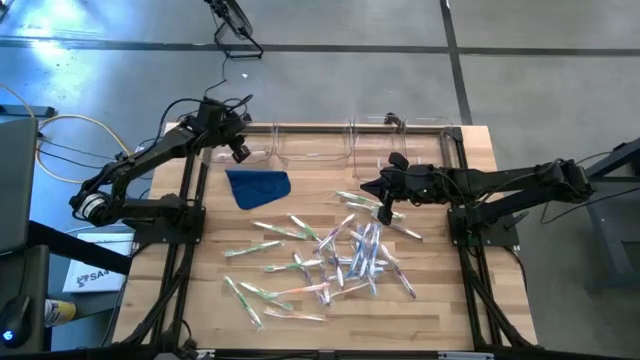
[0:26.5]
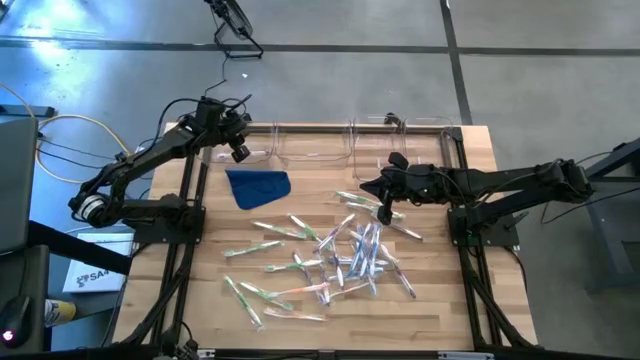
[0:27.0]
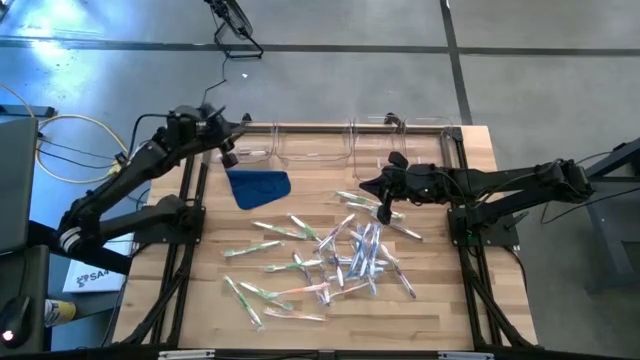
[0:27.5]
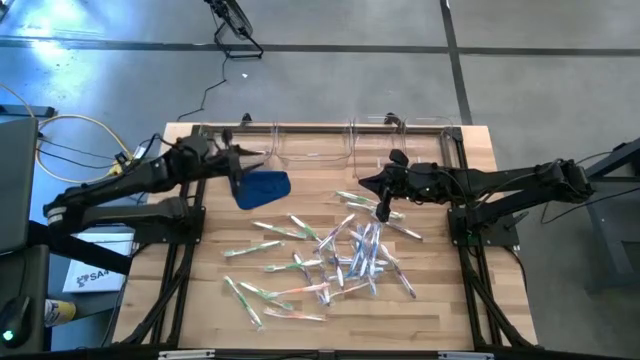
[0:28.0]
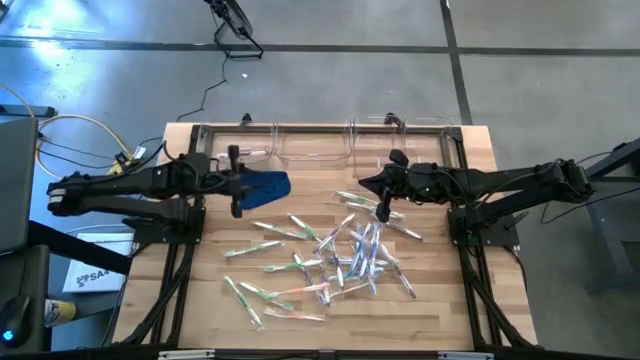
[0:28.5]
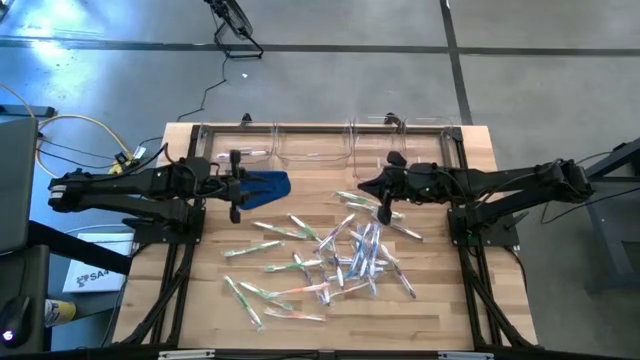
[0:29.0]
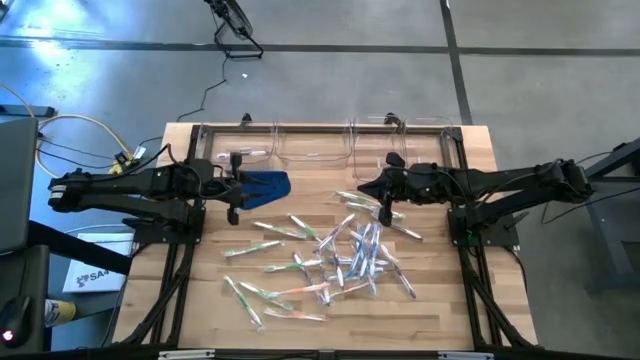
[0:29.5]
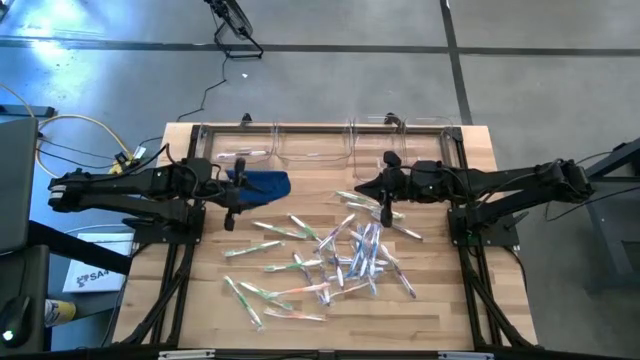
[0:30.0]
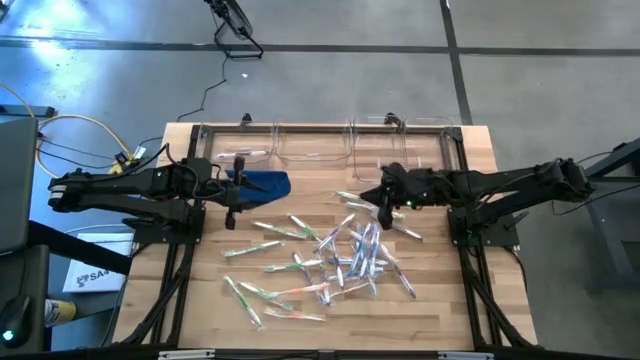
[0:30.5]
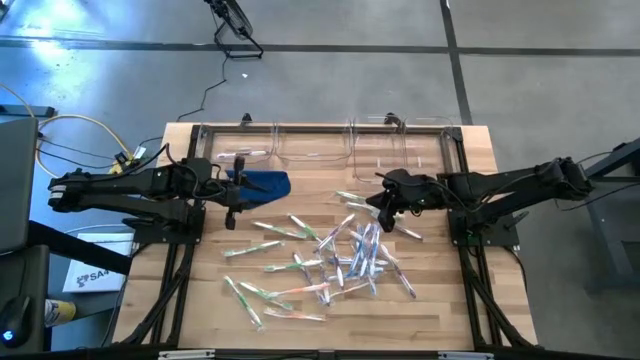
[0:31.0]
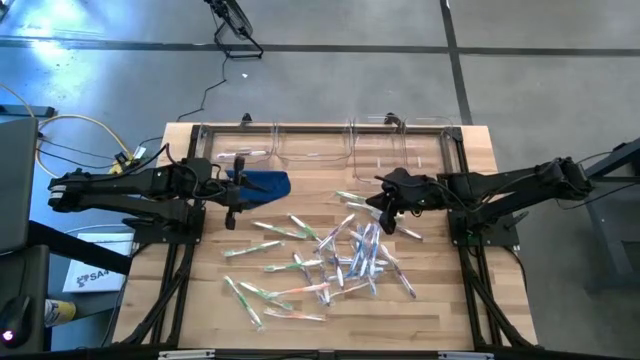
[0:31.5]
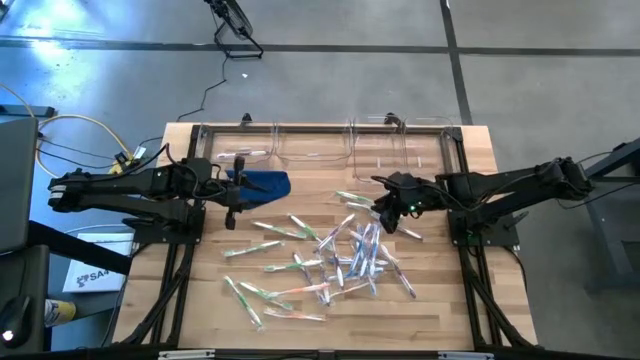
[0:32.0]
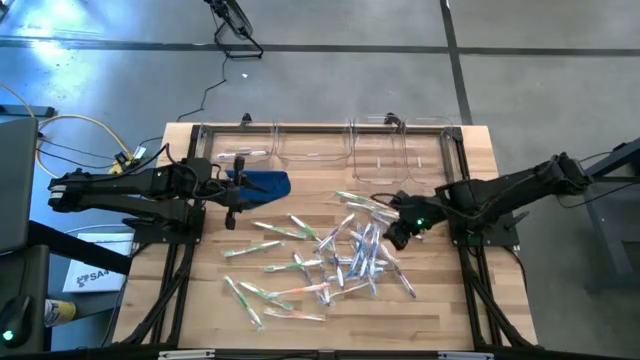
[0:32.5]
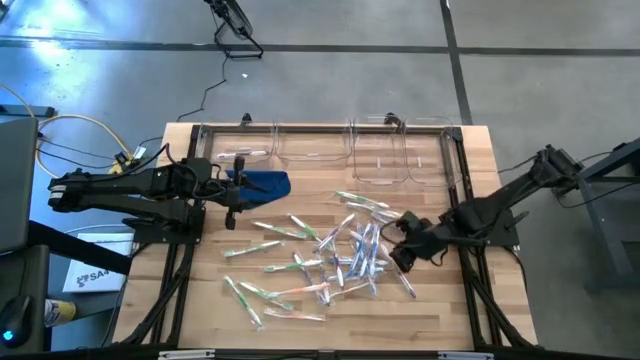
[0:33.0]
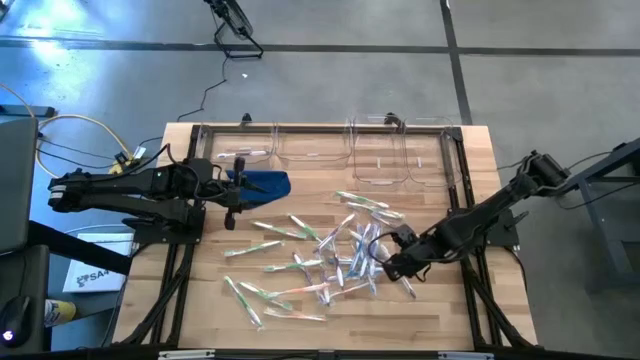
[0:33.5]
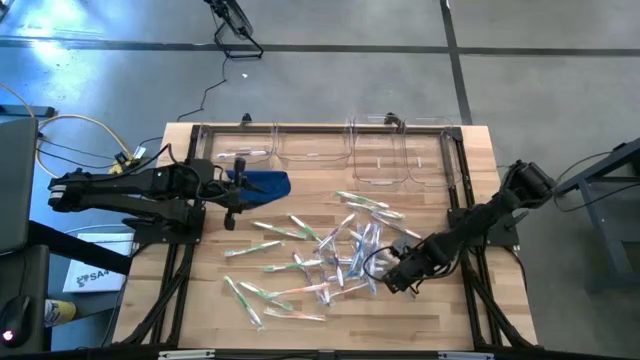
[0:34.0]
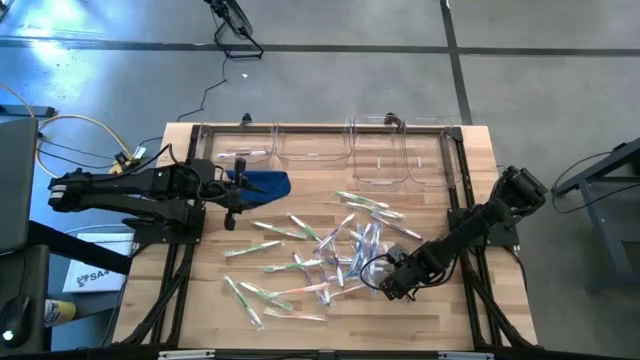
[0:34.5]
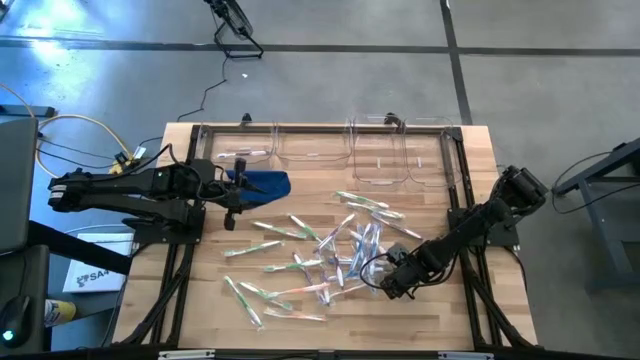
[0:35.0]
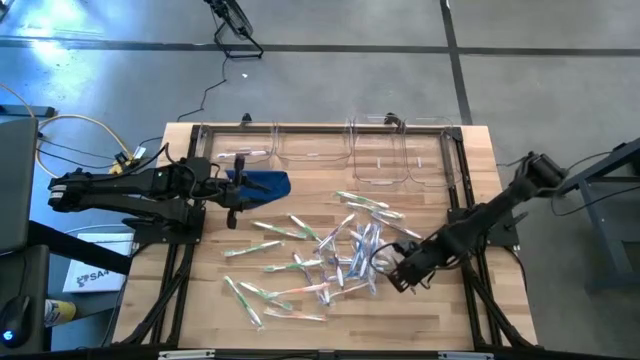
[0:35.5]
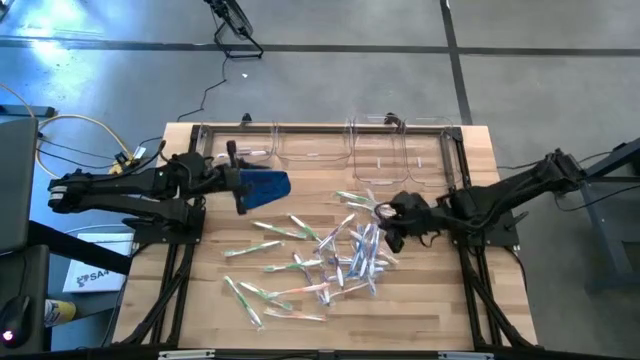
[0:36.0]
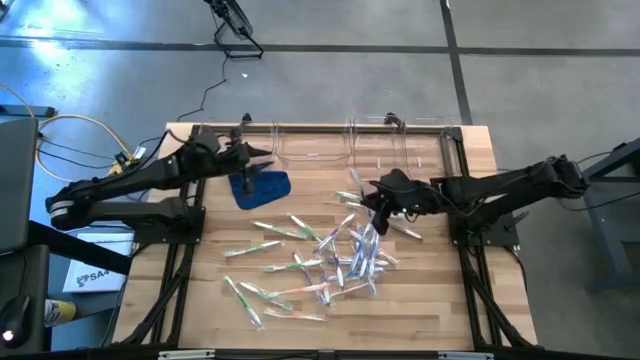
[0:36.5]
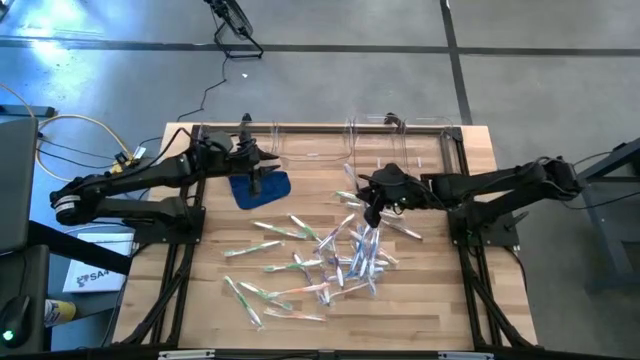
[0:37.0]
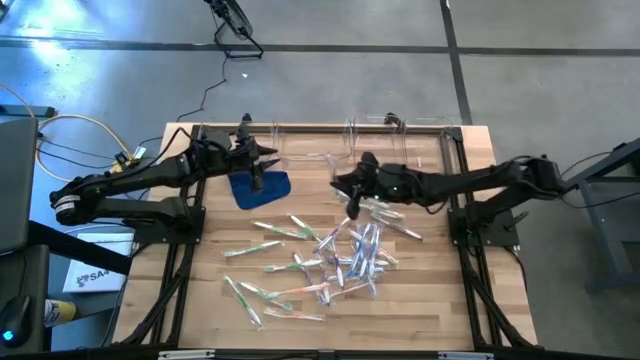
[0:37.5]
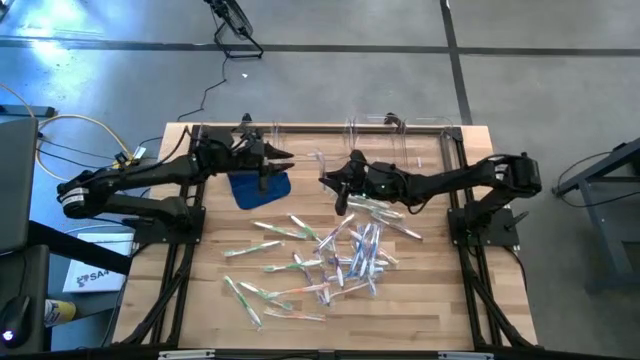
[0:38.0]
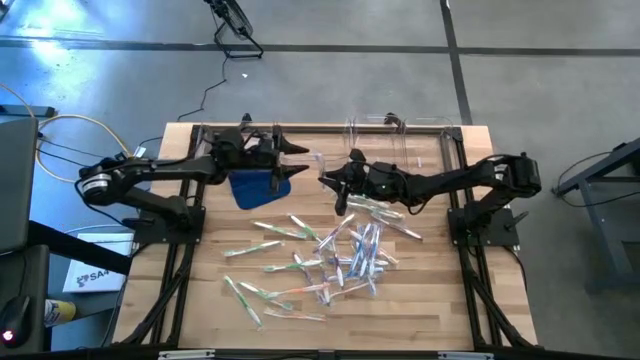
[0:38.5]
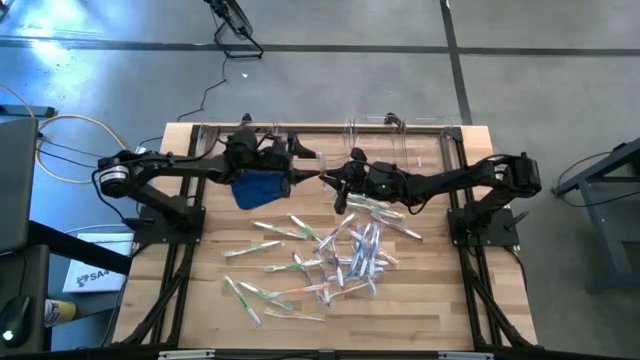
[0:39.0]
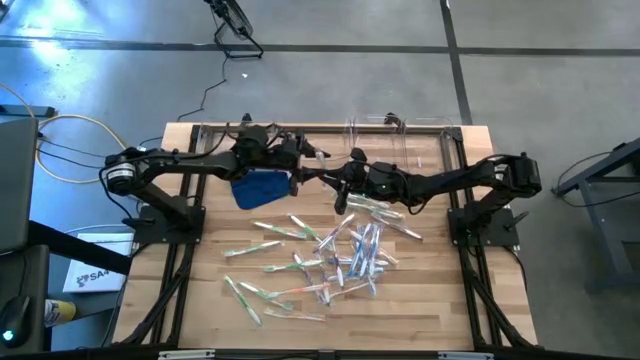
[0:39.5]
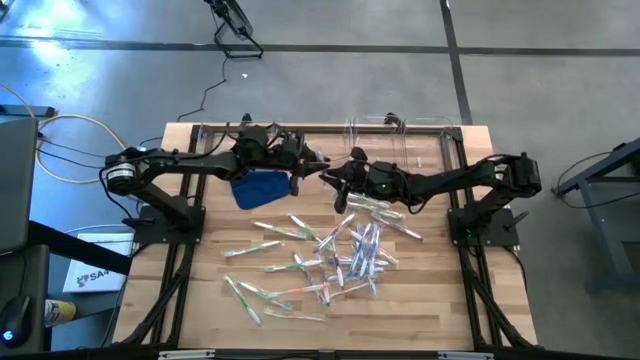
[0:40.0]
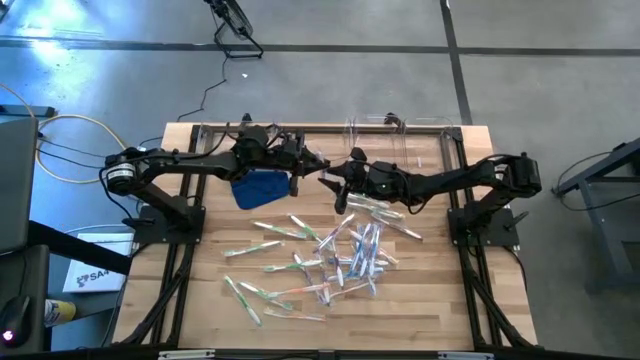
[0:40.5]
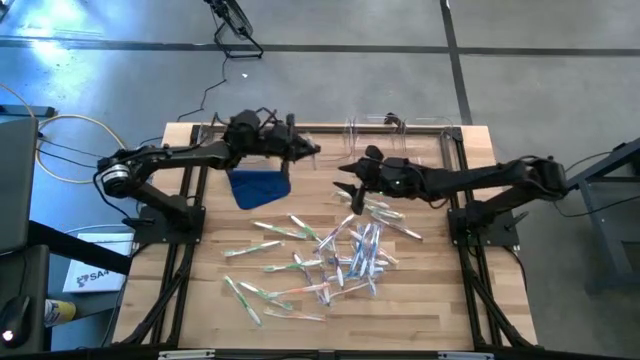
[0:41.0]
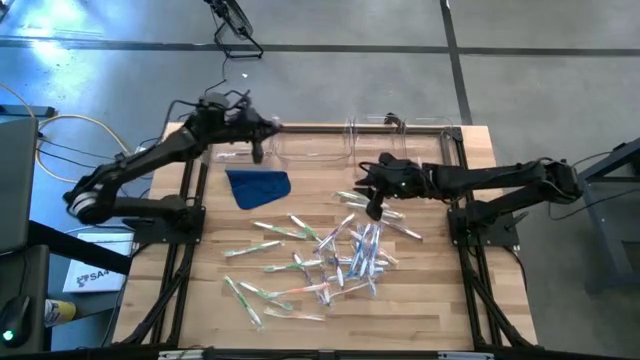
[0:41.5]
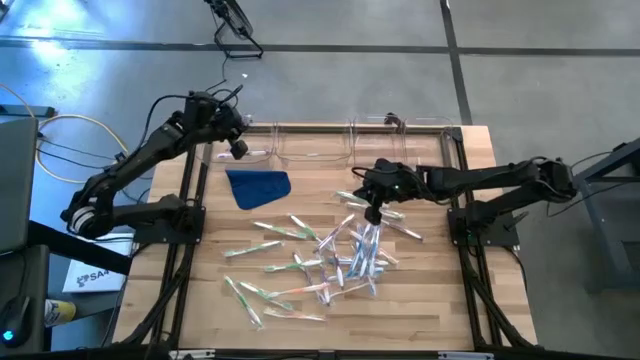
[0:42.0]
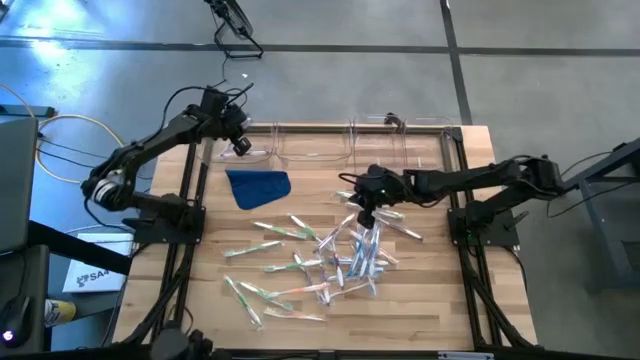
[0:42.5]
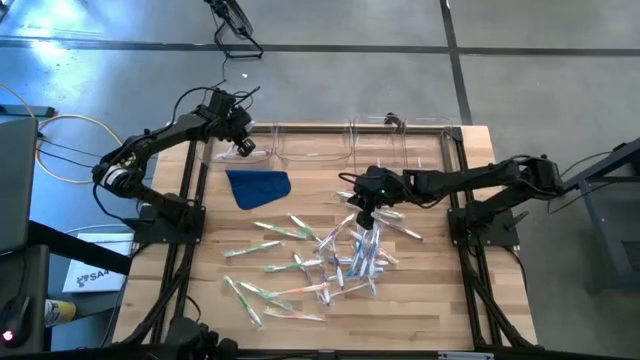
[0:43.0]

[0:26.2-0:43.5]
Task: Pick & Place Toothbrushes
Put the violet toothbrush into the left transparent bin

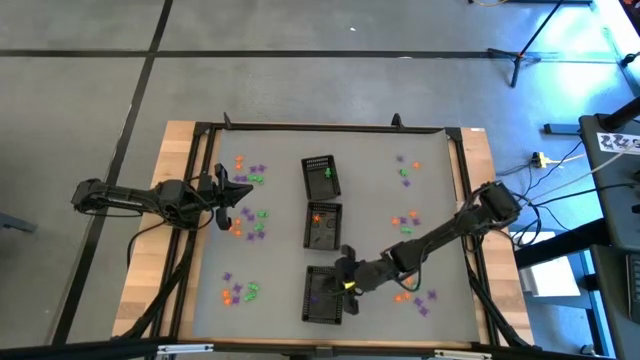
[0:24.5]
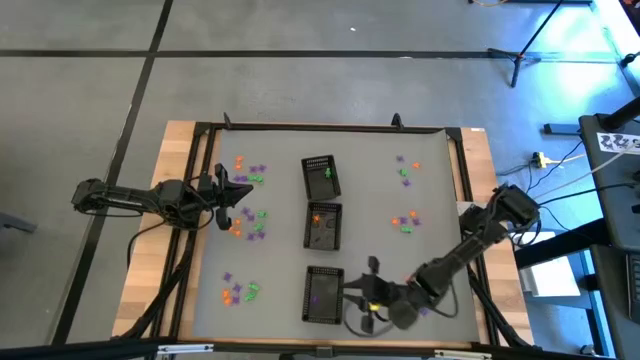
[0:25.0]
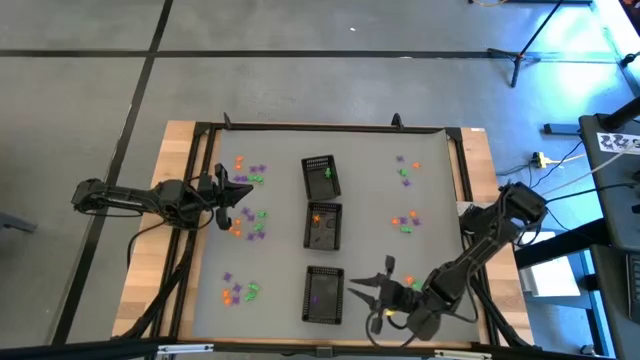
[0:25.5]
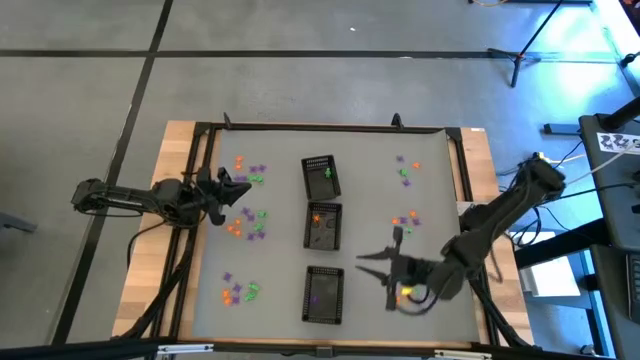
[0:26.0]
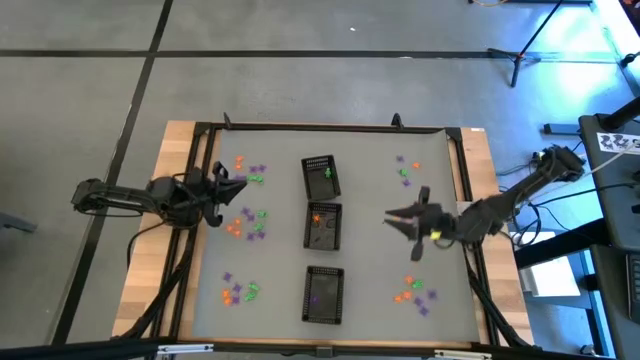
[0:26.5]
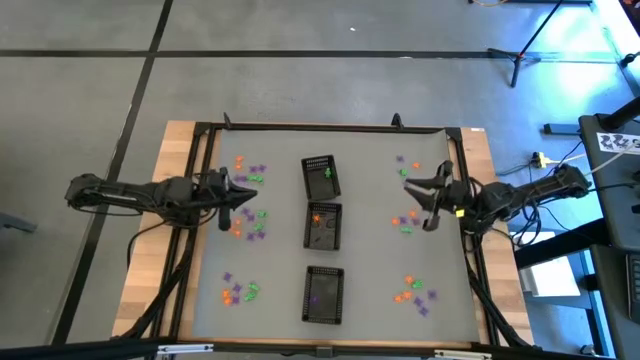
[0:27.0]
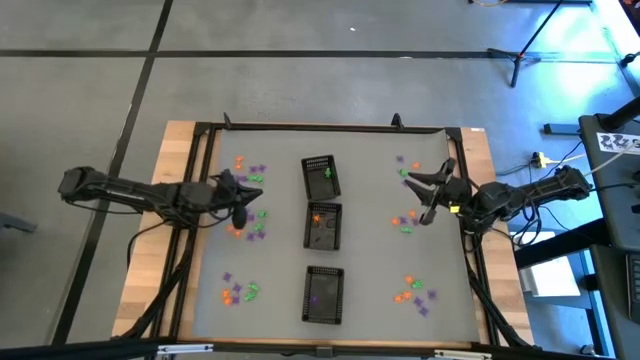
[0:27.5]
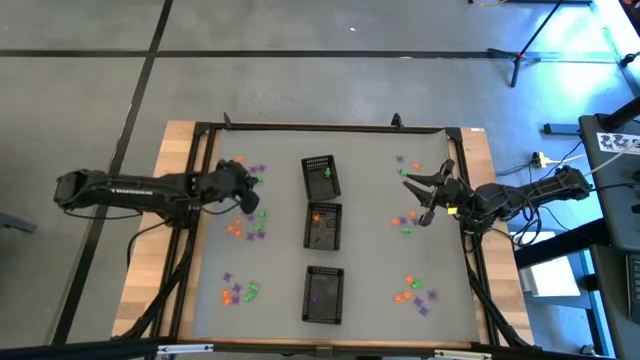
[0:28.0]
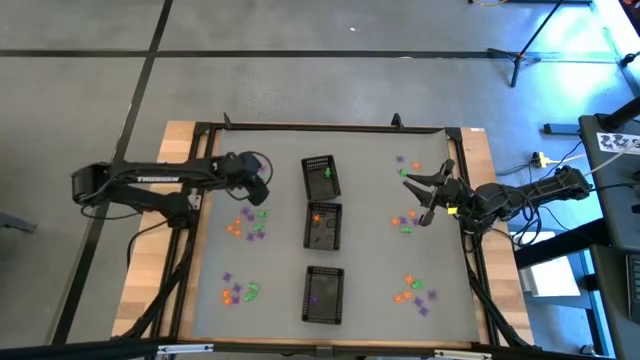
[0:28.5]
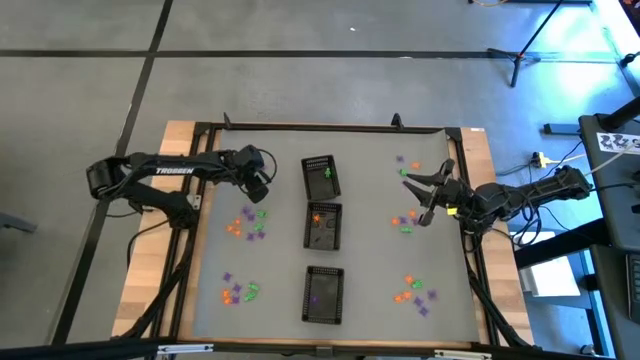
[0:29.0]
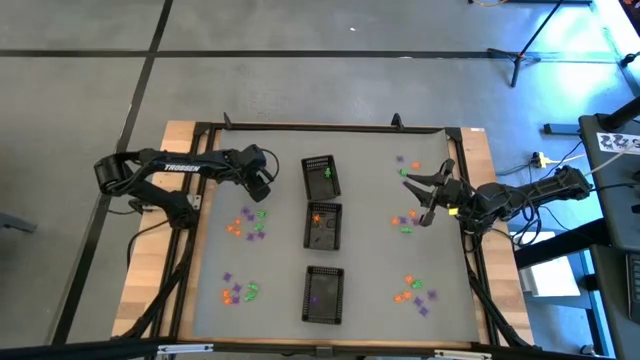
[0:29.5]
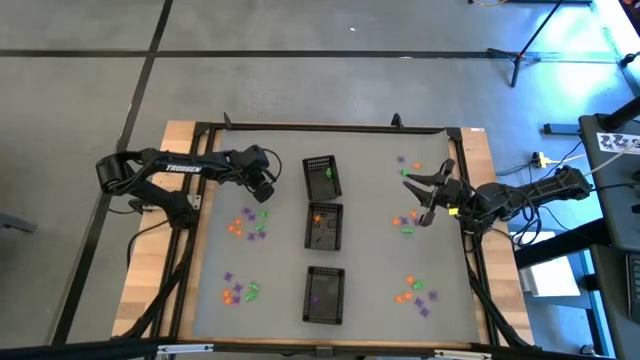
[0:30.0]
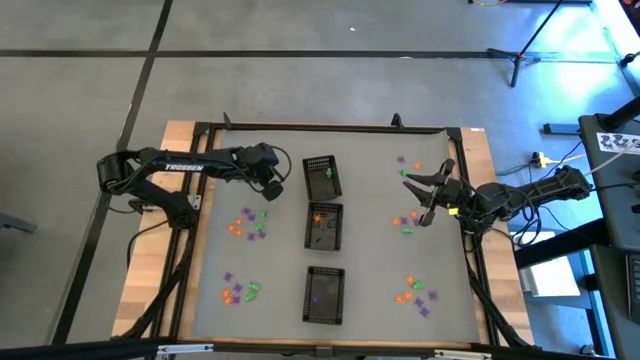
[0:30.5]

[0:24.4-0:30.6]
Task: Sort Halloween decoration
Put the green skeleton toy into the top black bin
